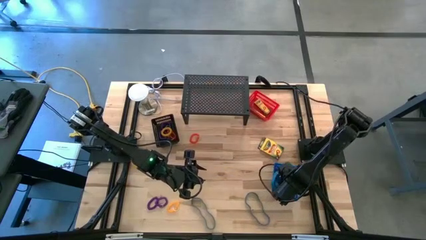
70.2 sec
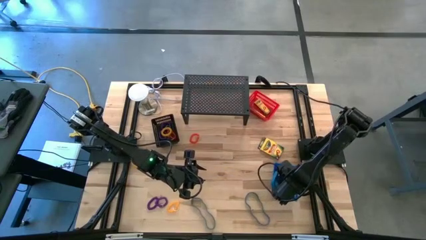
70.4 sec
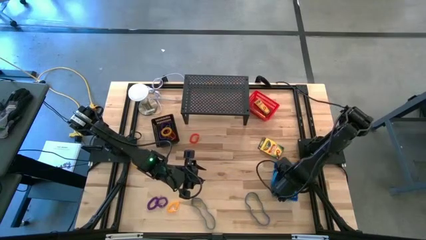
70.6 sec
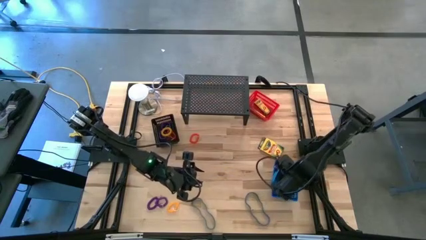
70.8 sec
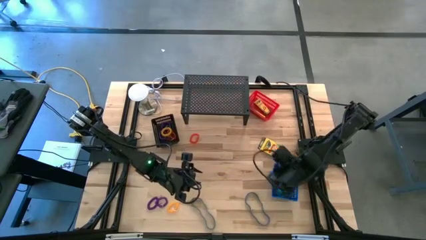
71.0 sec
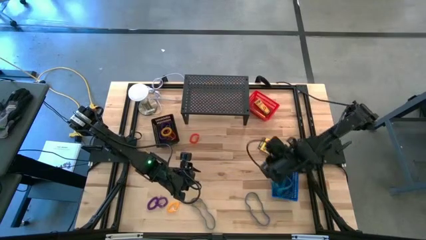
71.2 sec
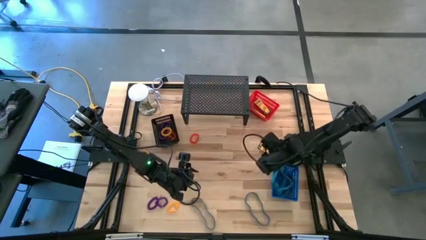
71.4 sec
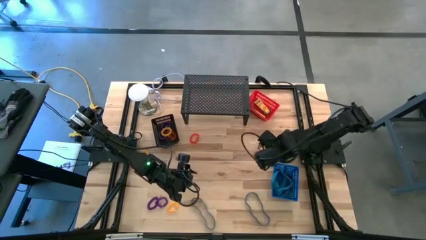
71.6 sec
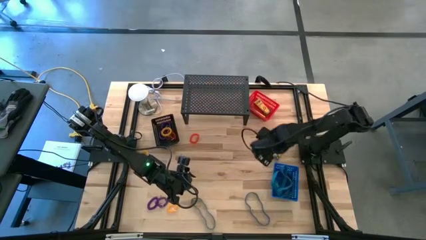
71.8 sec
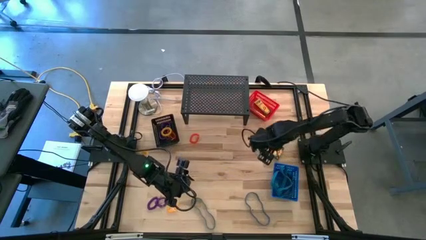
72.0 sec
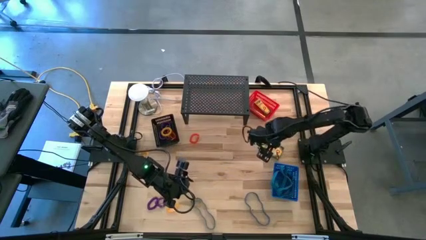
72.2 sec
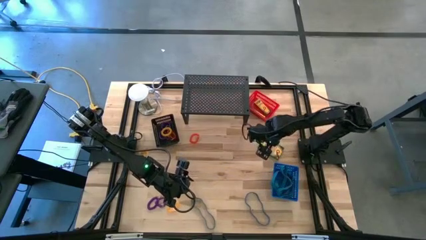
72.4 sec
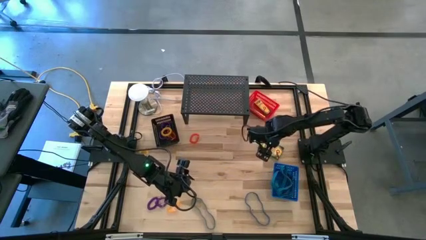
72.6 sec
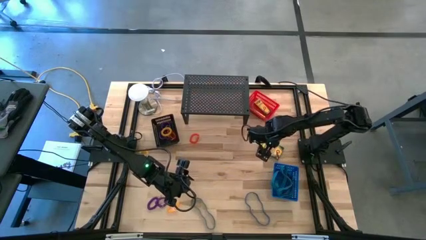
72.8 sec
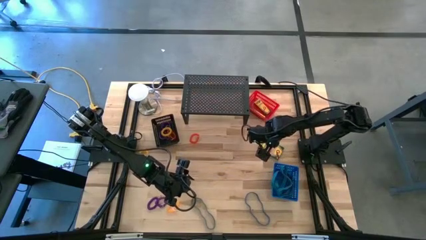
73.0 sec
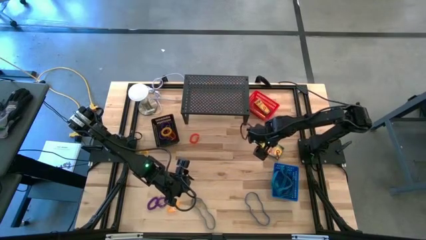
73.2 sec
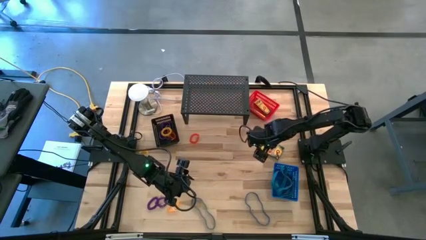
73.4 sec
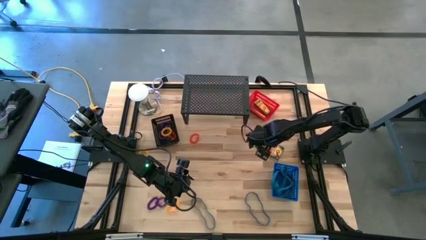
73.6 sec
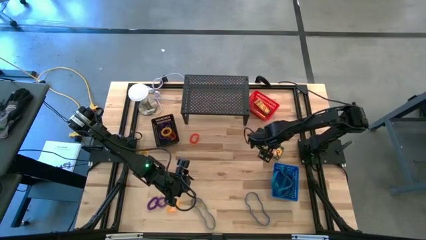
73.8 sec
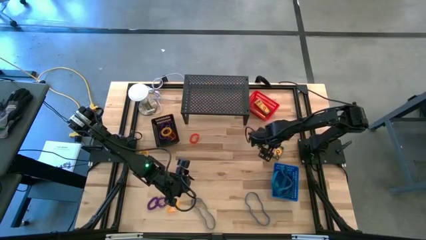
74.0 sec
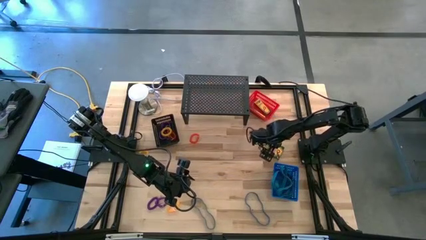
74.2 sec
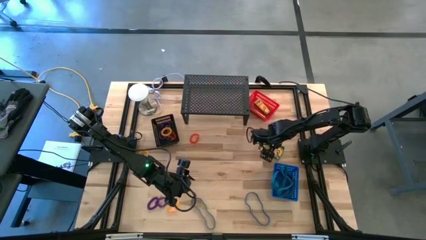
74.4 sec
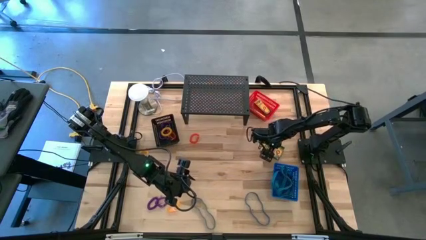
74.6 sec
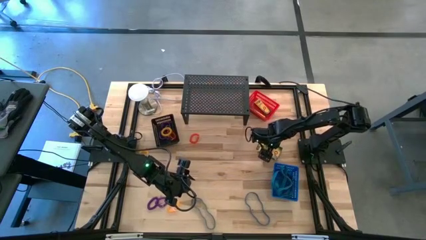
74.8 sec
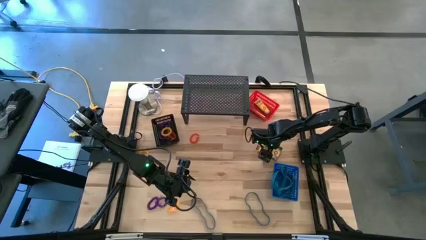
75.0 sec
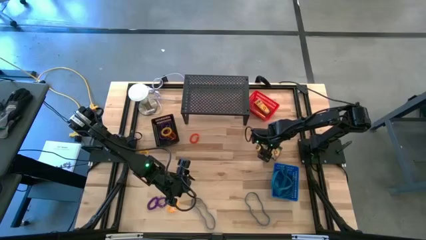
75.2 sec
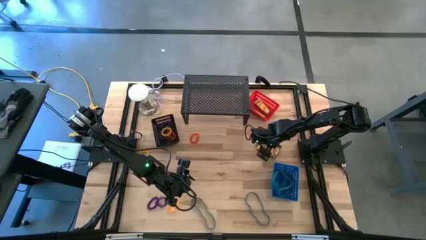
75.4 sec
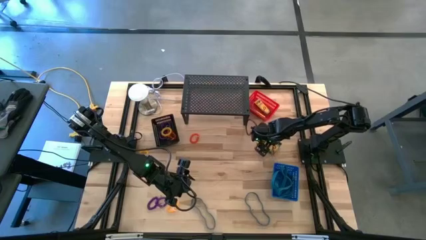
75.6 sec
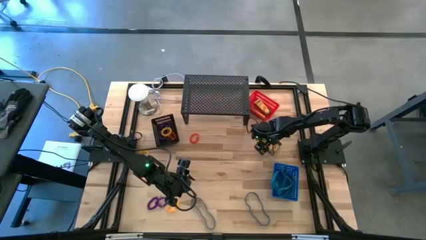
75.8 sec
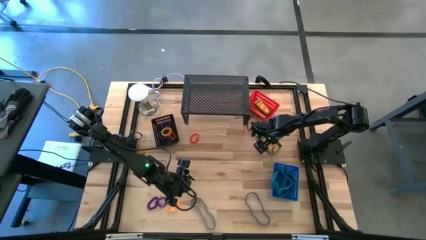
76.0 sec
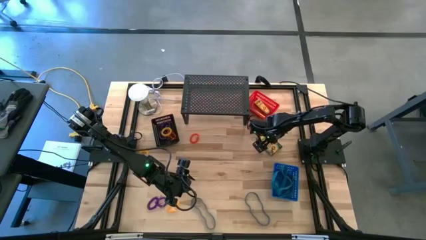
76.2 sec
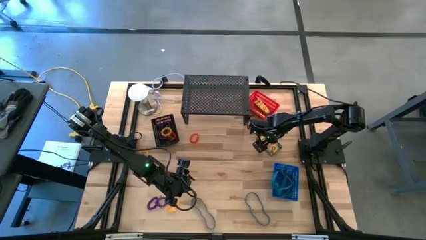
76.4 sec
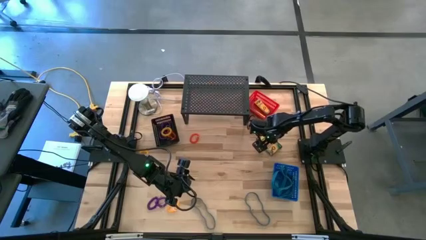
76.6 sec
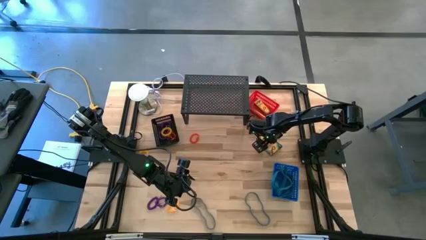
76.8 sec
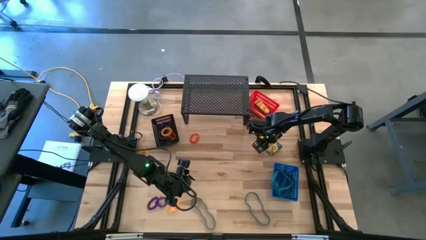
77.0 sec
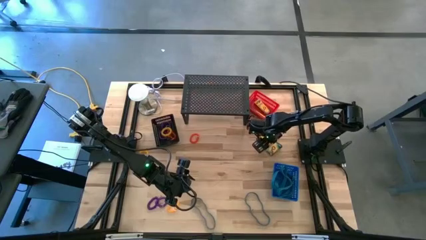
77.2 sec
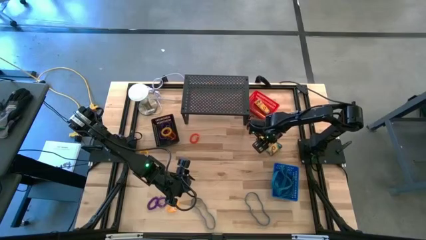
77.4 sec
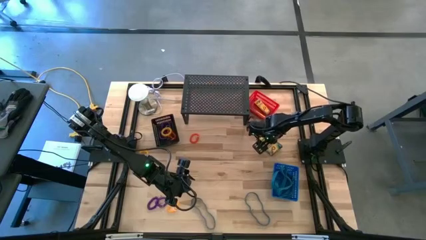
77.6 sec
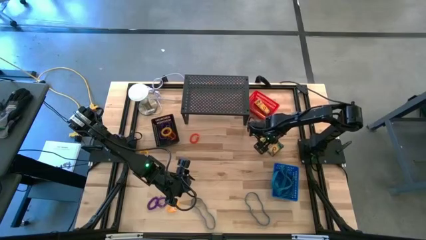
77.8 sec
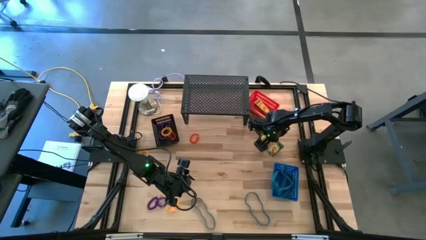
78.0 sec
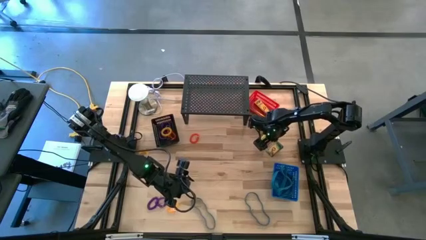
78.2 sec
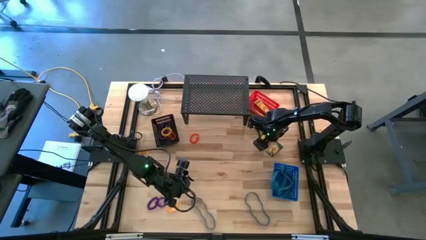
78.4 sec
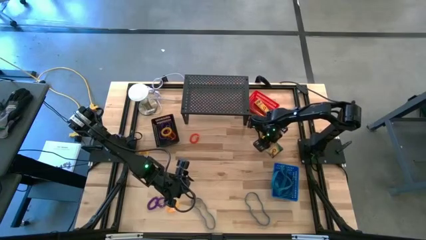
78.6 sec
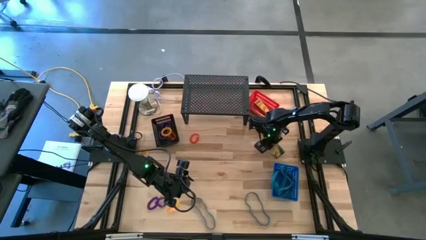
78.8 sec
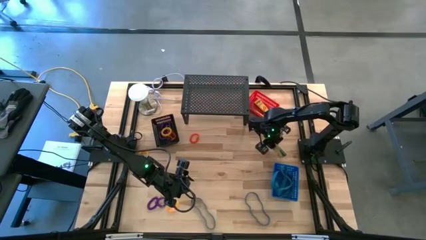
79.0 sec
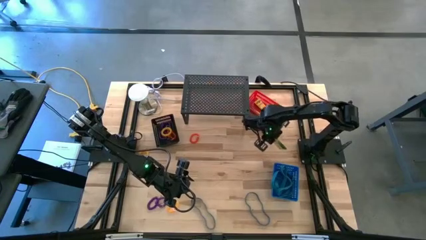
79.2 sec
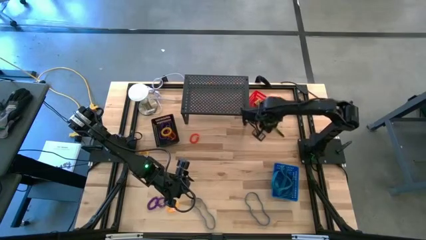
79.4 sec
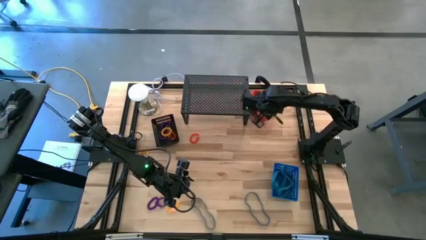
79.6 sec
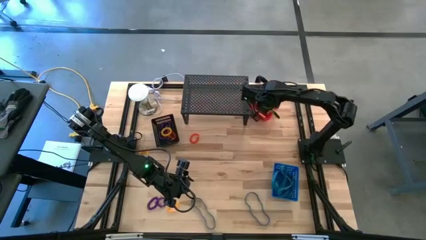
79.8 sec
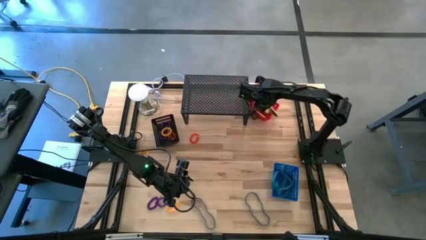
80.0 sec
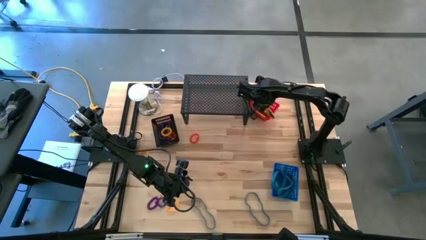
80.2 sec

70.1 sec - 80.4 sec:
Task: Pick & Place Office Desk Supplies
Put the big crayon box into the red basket

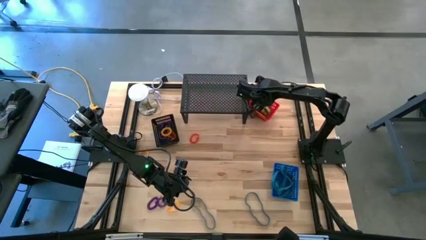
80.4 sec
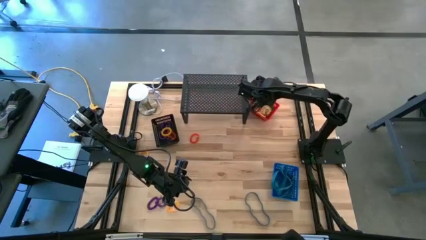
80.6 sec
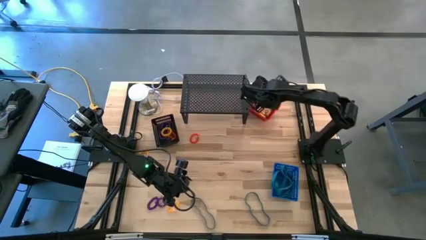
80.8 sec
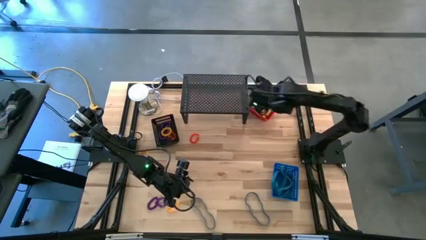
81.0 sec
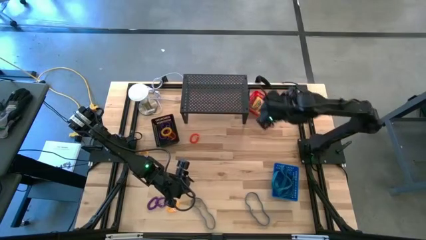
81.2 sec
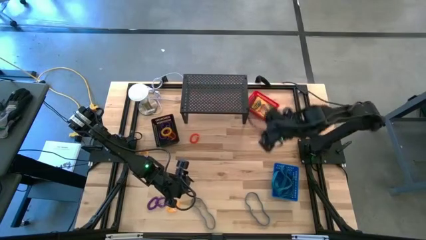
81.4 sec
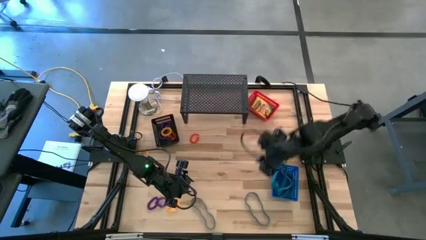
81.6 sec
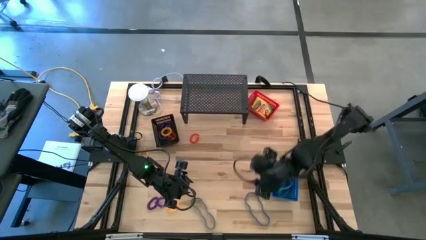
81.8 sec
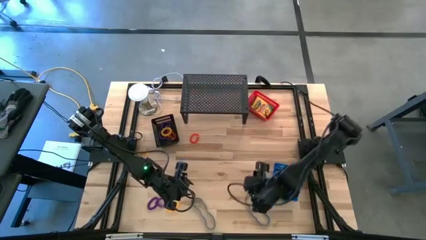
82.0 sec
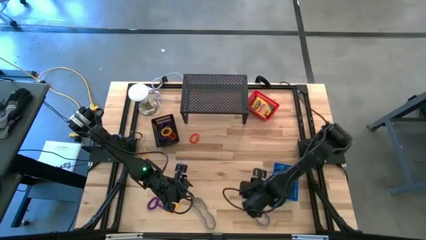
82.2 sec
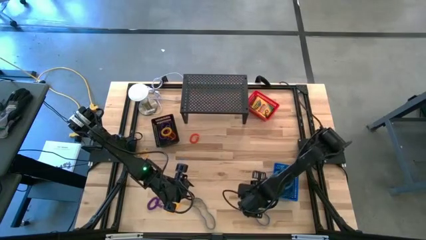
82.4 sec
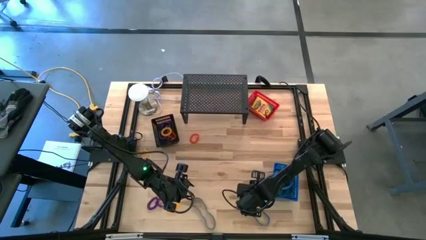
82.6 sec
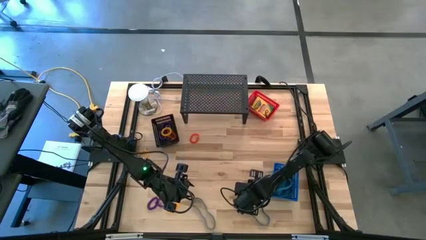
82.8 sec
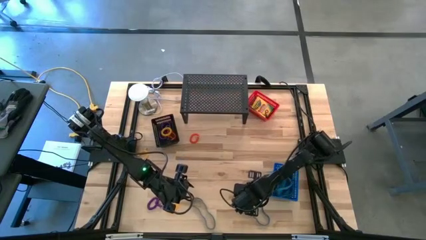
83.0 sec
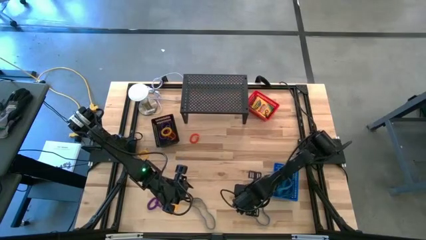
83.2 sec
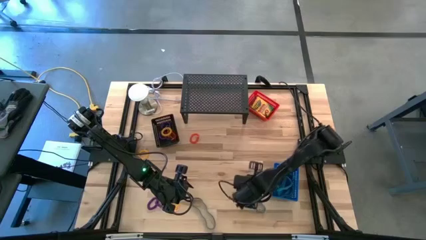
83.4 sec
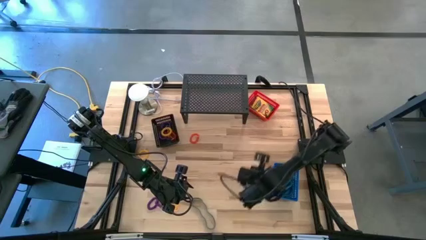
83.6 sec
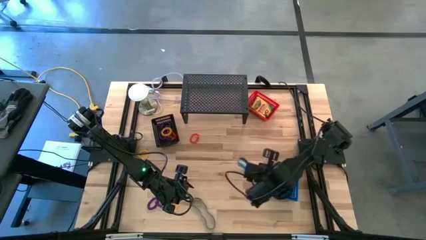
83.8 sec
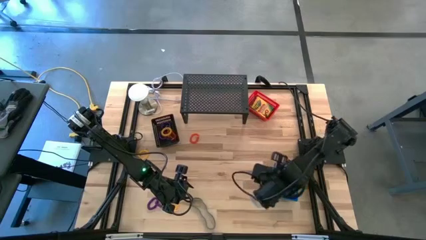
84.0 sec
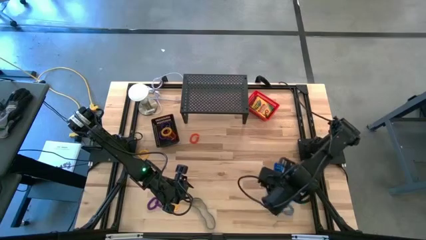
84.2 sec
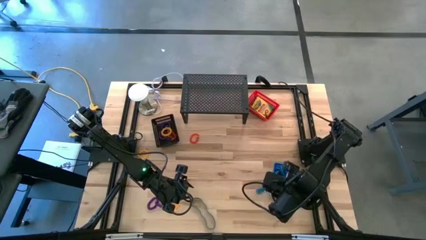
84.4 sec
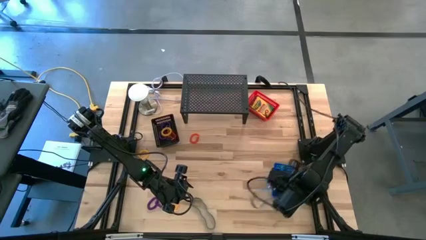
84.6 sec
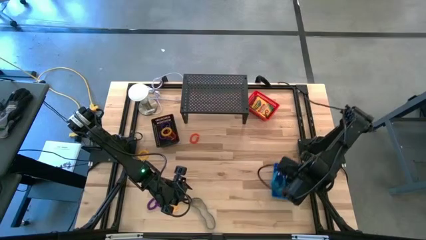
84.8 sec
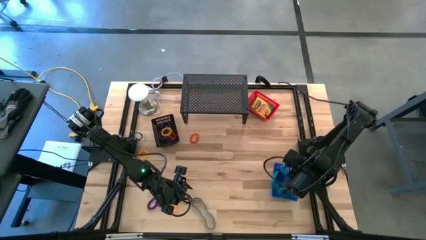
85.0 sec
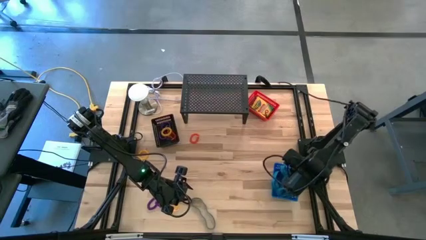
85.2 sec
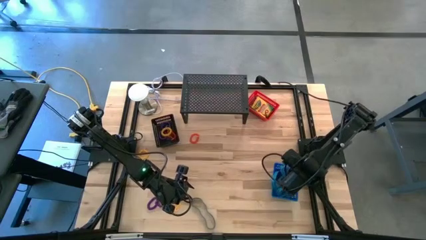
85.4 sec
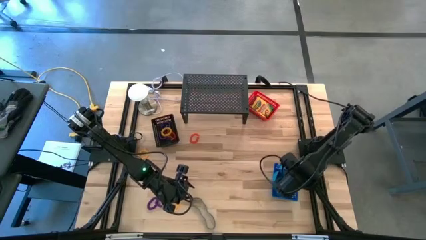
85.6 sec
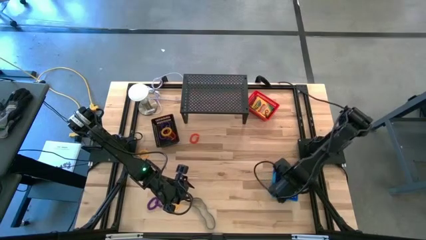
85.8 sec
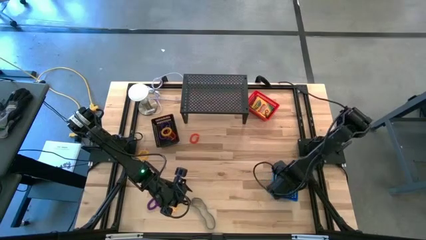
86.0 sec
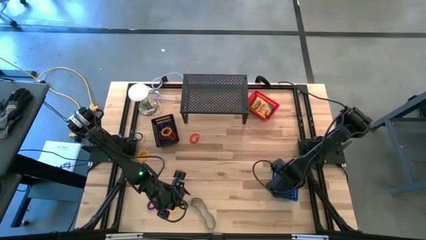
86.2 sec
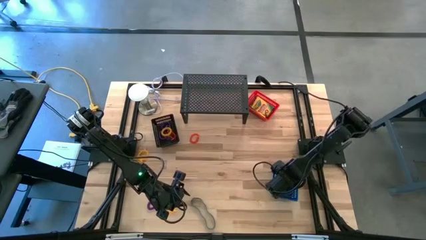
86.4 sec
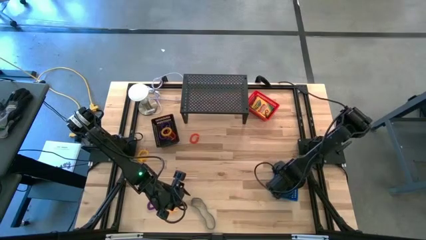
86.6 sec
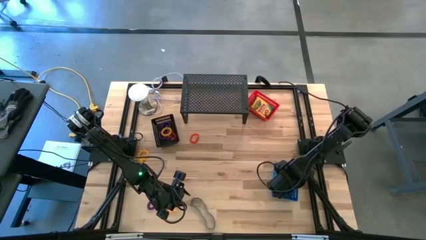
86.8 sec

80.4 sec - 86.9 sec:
Put the blue rubber band into the blue basket
